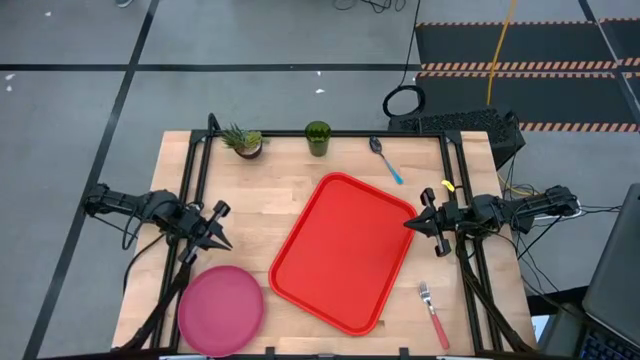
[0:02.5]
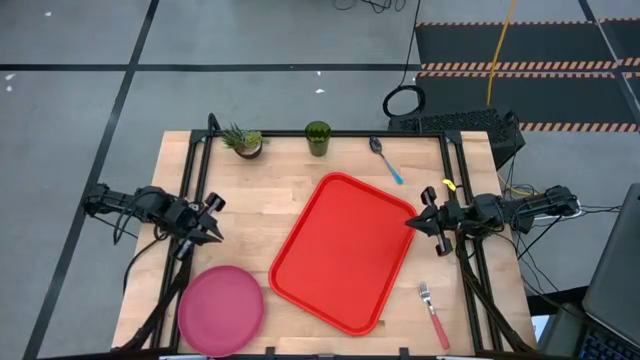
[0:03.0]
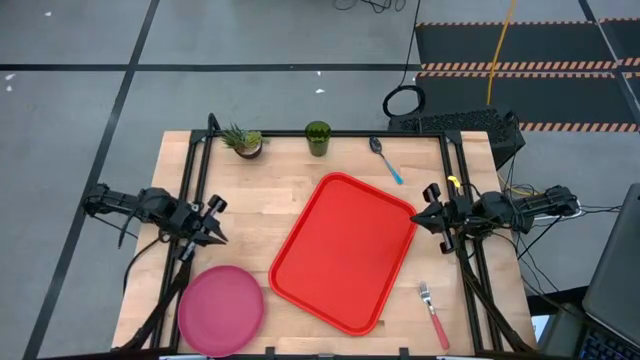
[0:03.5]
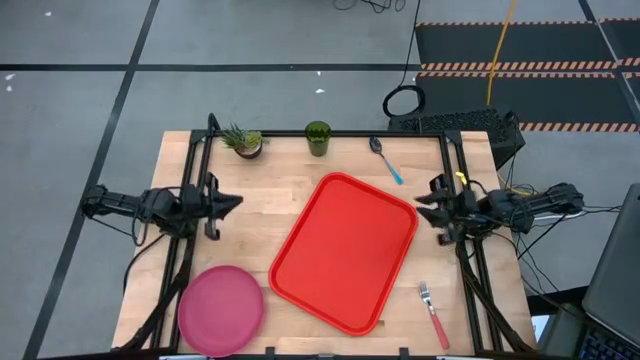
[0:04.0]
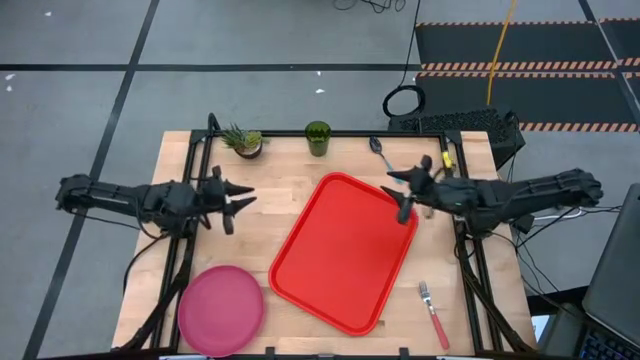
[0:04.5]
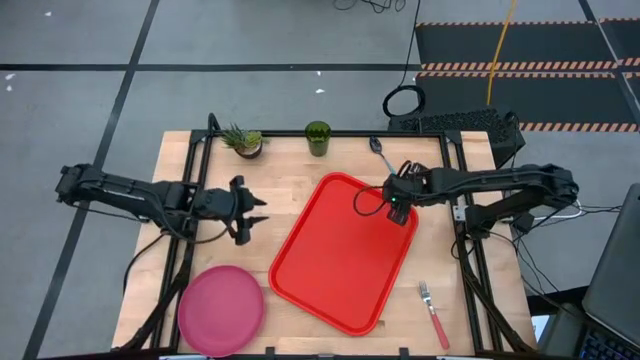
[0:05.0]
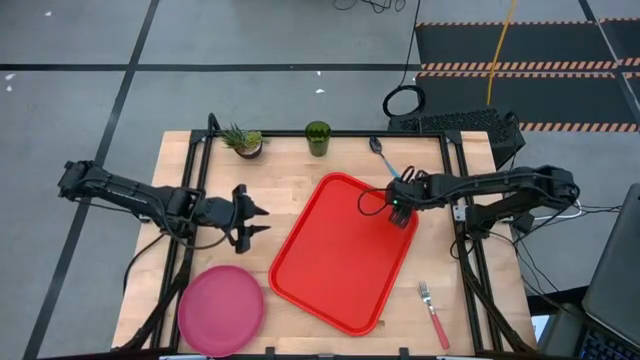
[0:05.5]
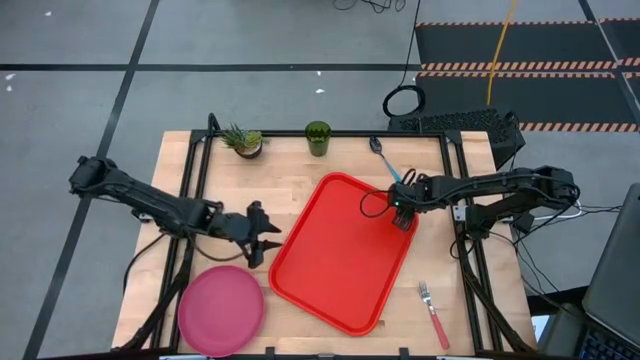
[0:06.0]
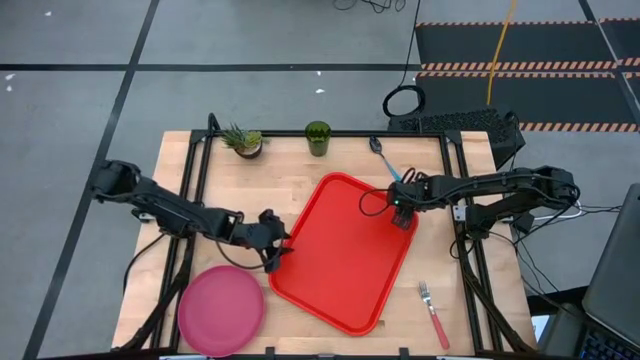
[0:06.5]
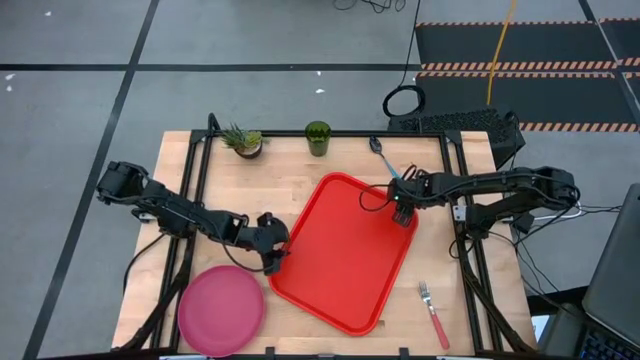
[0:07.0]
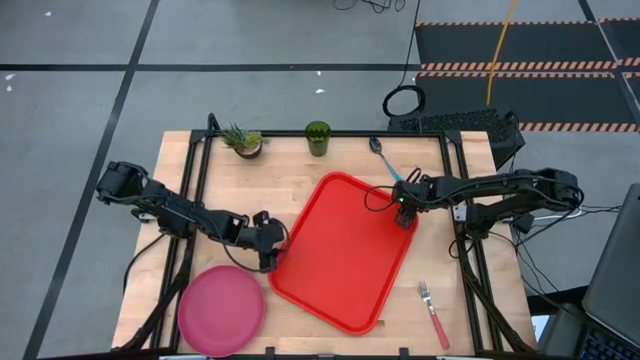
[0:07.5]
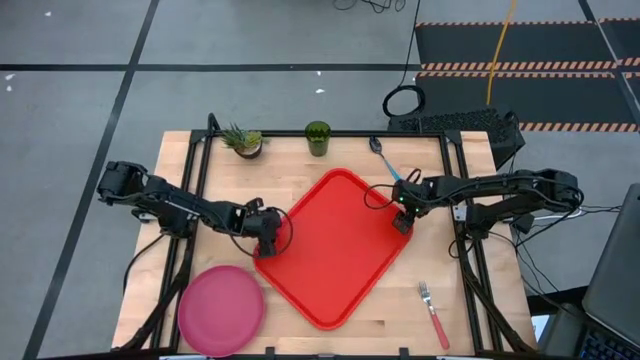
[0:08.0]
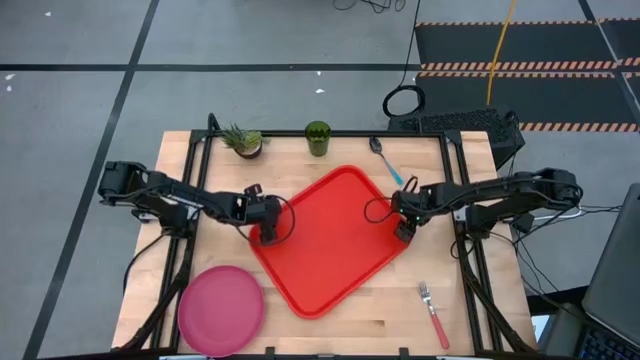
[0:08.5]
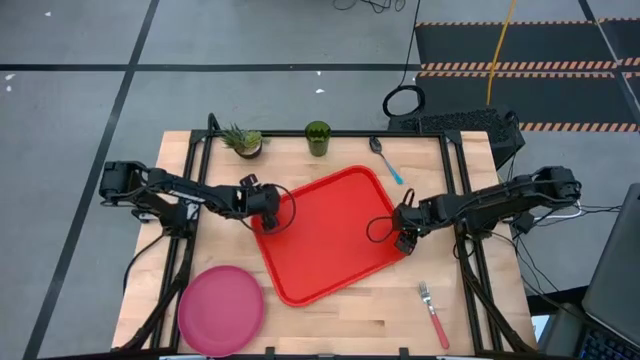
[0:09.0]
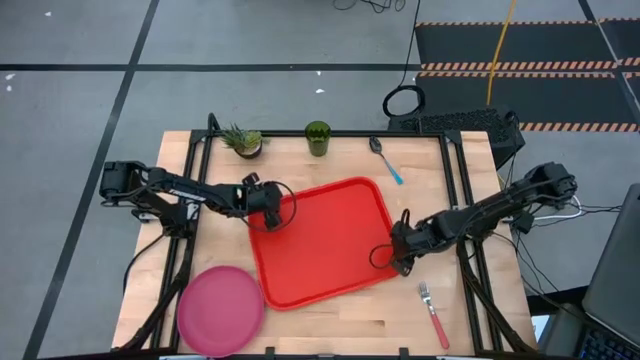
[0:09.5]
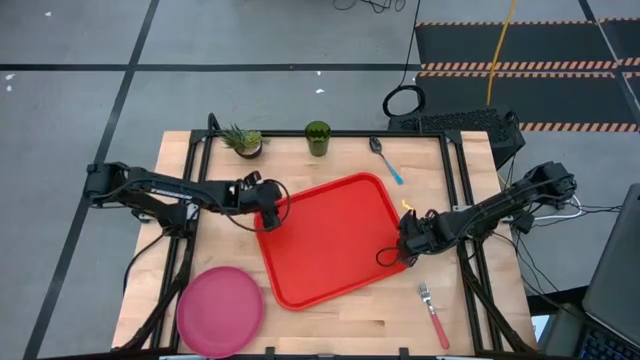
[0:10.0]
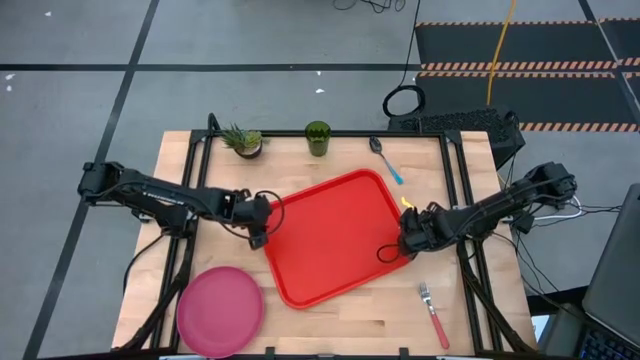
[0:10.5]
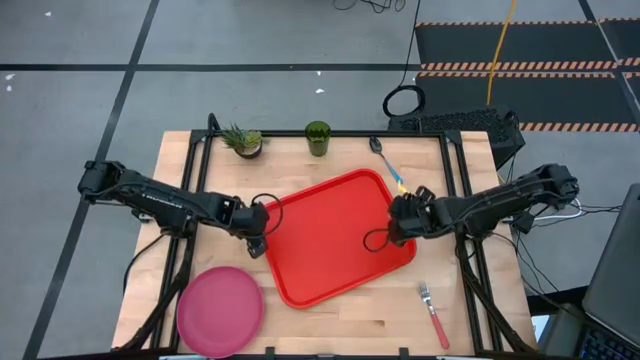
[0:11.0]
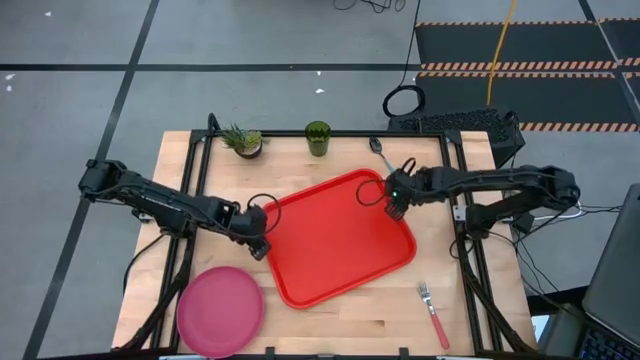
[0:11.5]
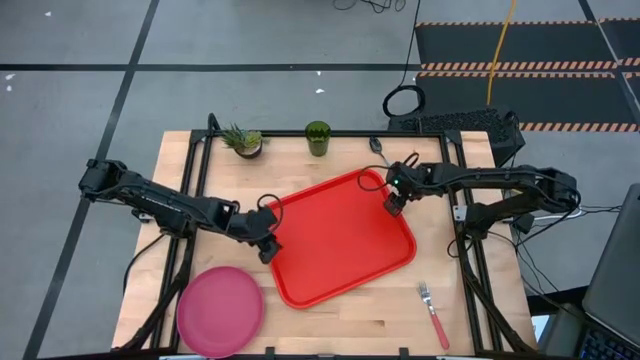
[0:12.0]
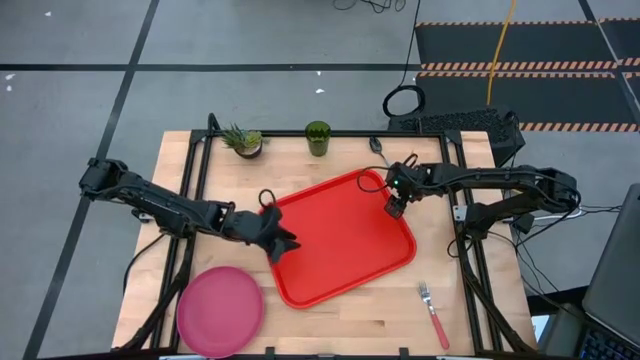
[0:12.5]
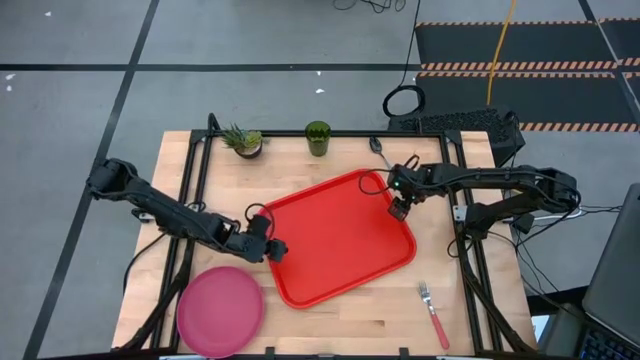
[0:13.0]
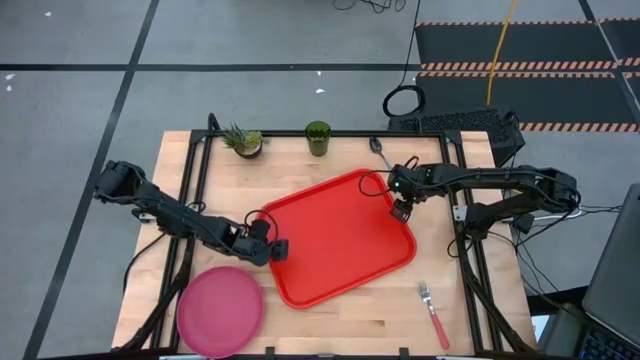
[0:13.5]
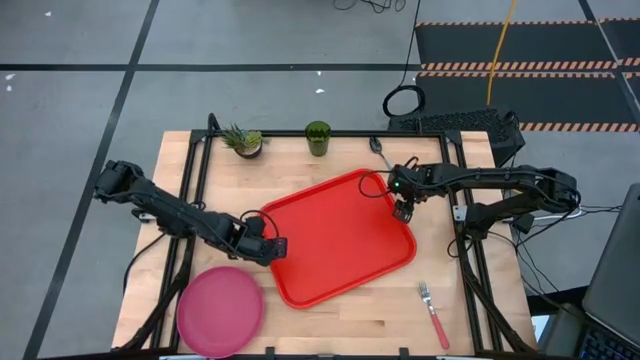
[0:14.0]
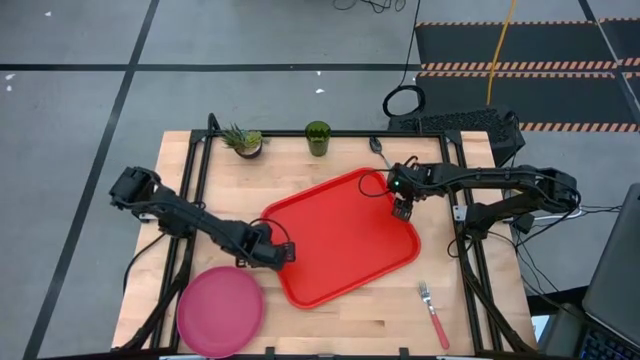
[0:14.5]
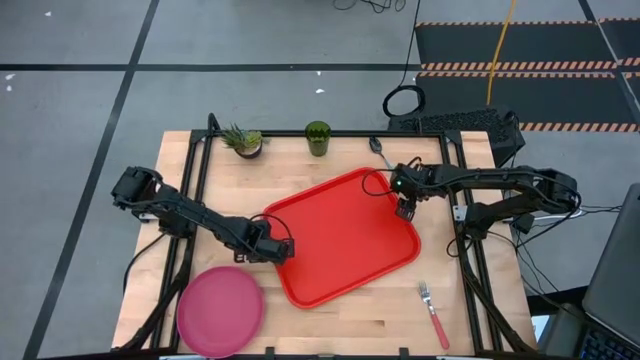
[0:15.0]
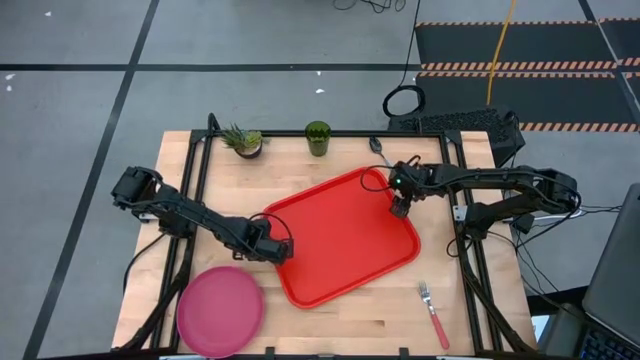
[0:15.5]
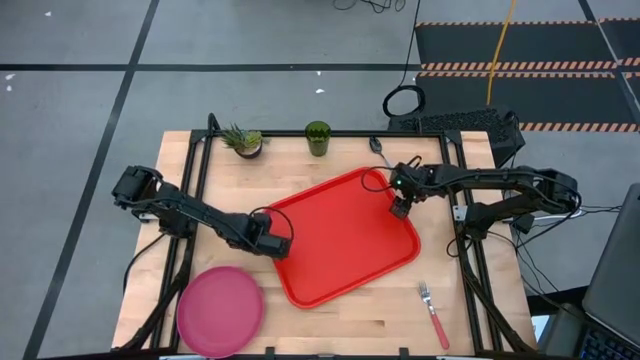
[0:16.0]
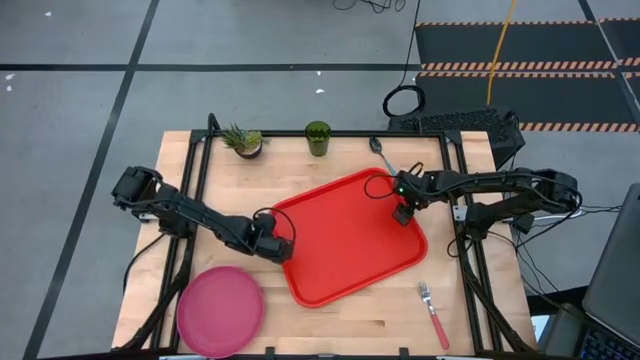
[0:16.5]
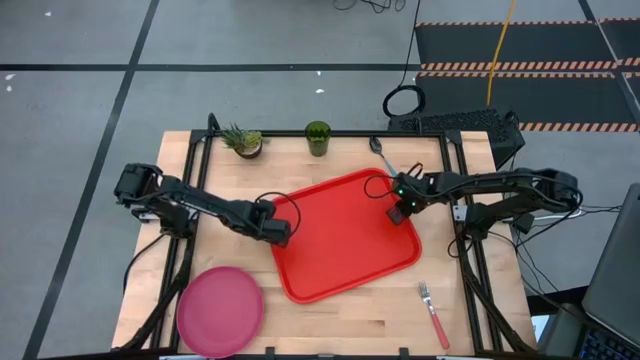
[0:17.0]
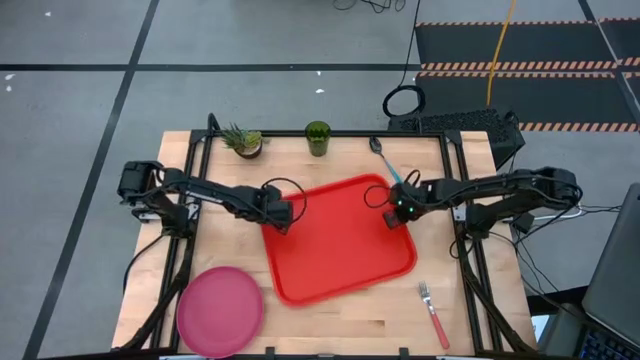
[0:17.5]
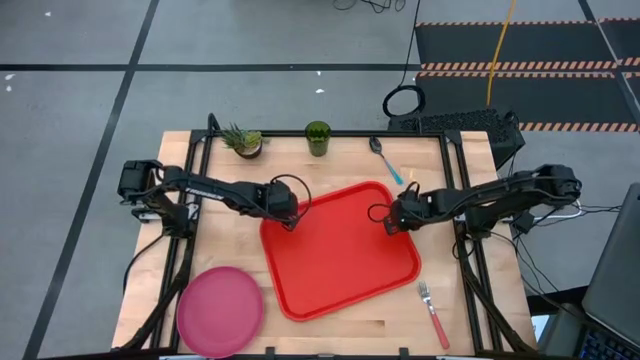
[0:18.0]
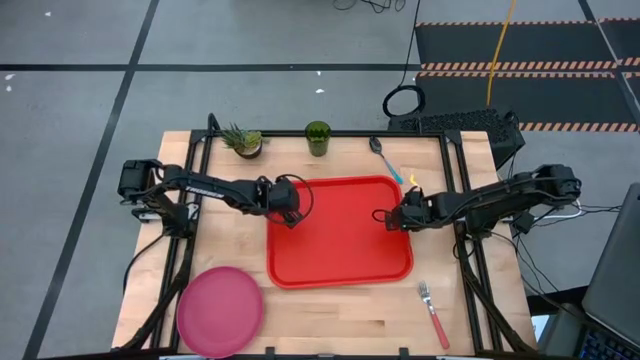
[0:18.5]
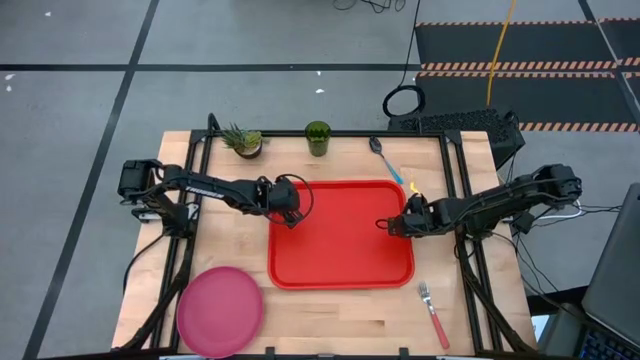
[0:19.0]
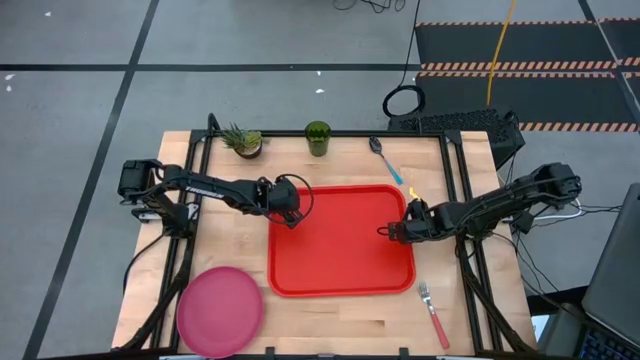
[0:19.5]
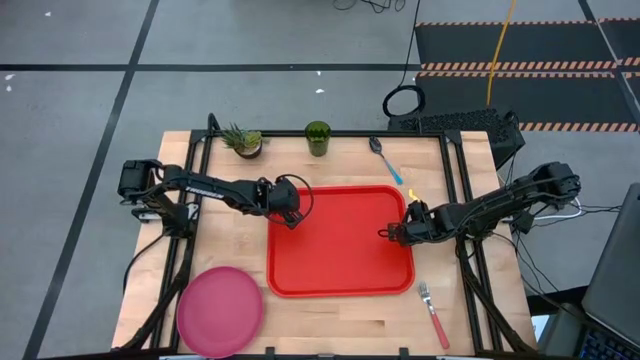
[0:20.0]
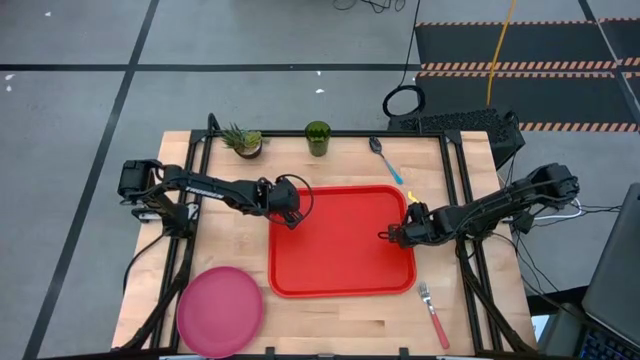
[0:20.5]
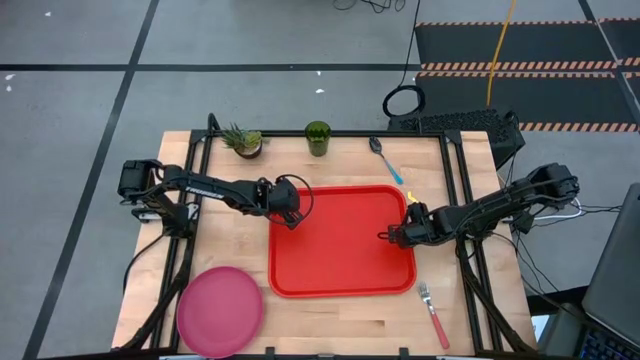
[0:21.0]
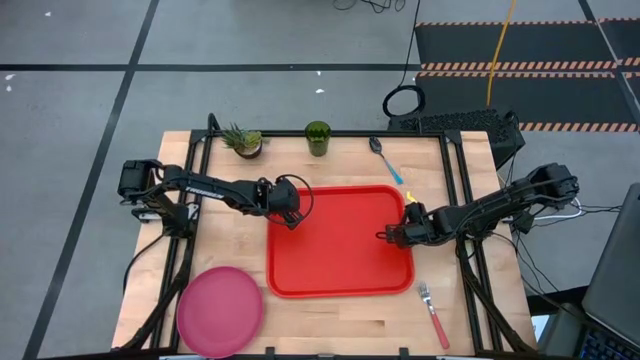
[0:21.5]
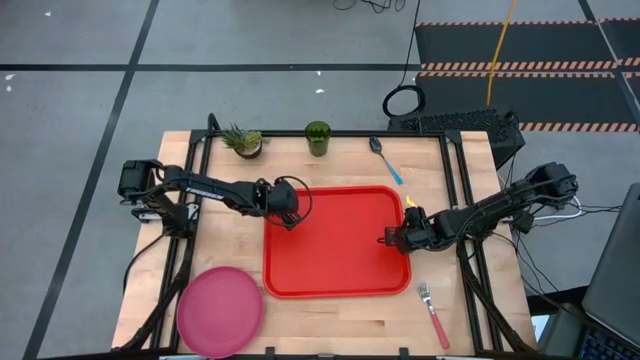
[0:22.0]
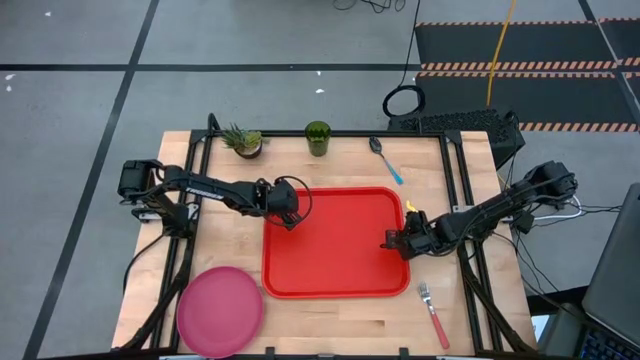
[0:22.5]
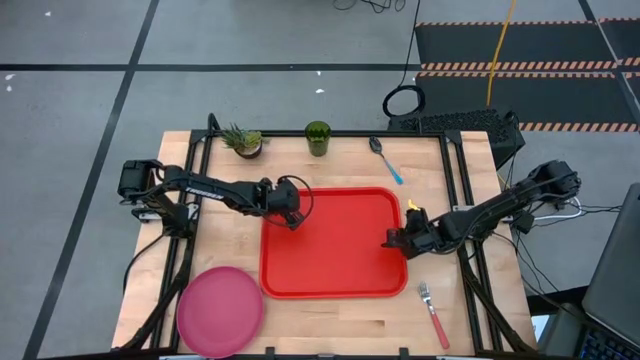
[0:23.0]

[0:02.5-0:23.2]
Task: Pick and place plate/cup/fork/spoon on tray
Adjust the red serving tray
